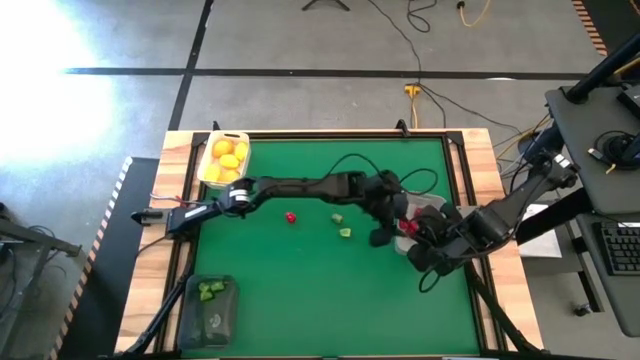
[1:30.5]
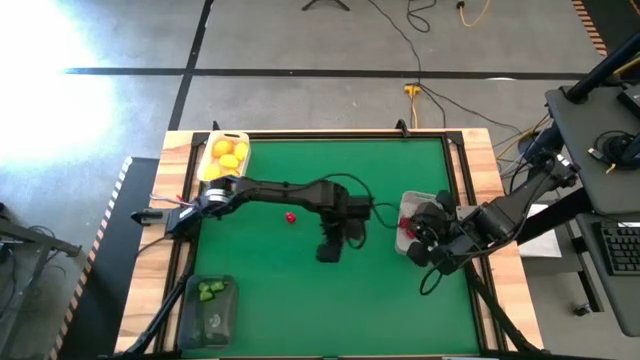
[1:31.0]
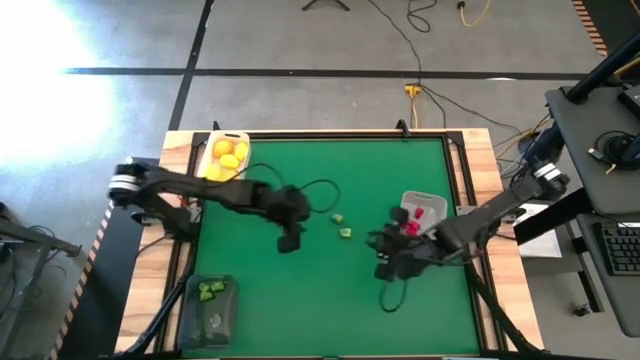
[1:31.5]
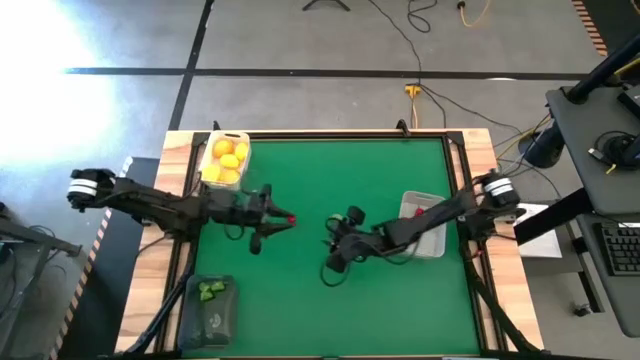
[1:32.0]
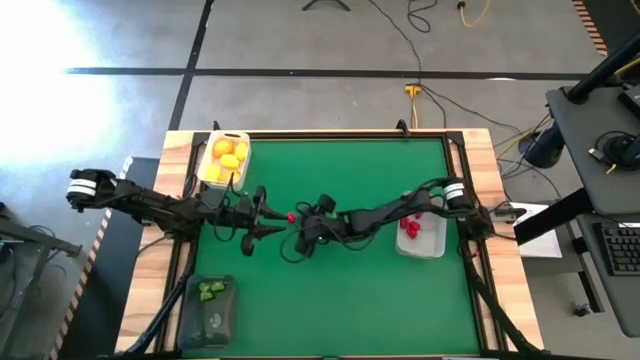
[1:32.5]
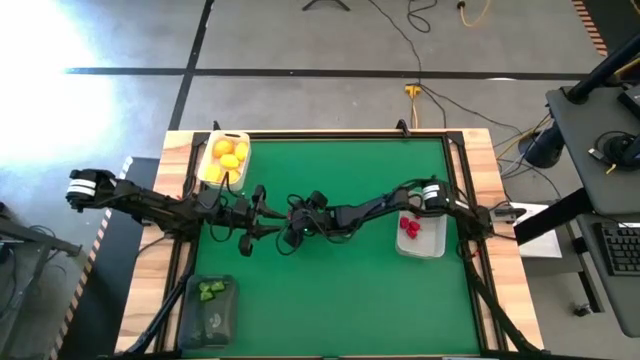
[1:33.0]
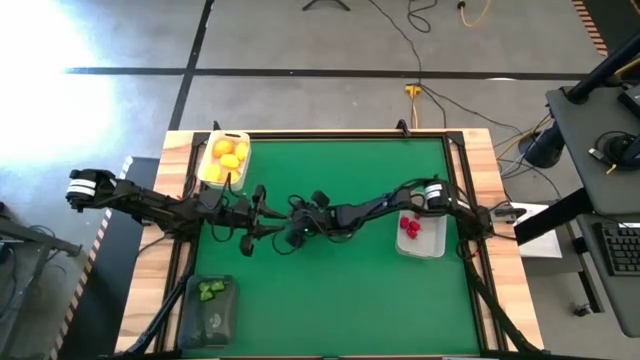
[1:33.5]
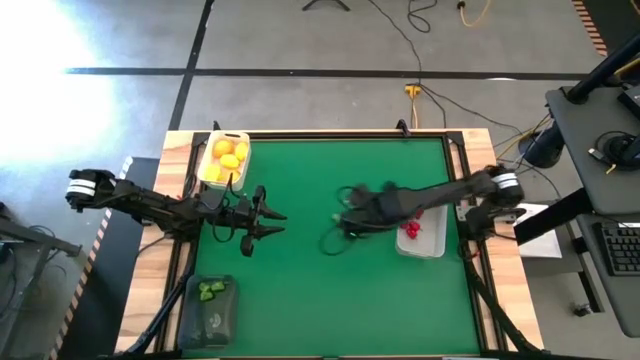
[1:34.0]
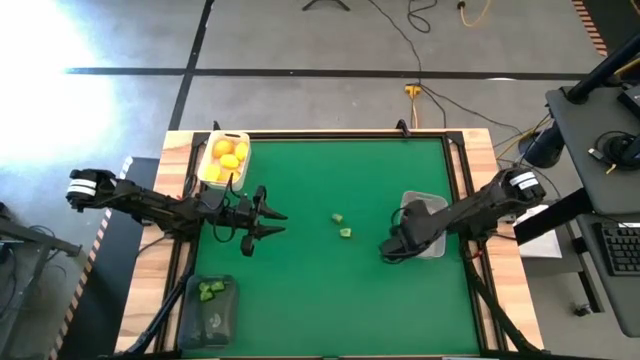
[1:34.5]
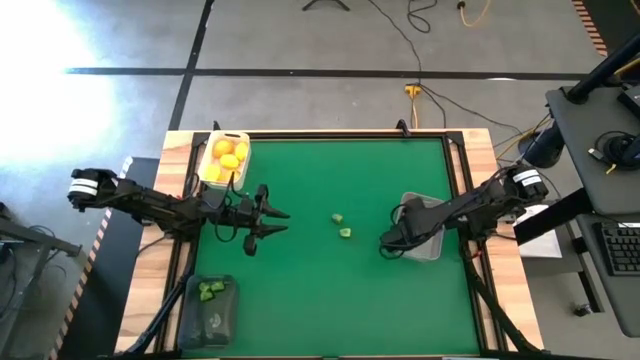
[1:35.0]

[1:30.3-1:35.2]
Task: Sort produce into baskets
Put the red chili pepper into the gray bin

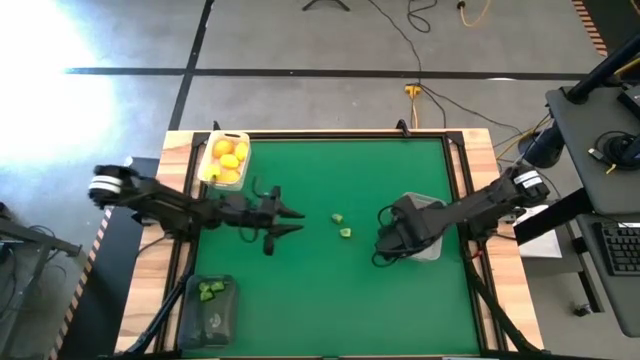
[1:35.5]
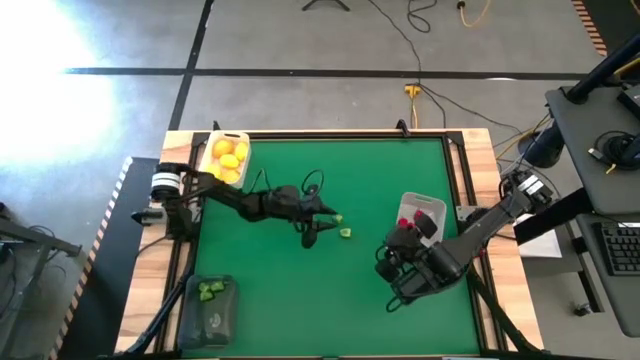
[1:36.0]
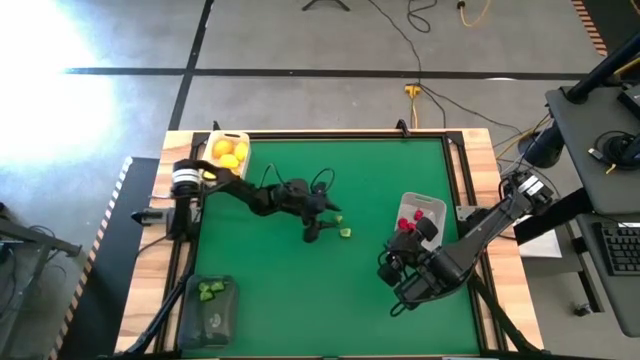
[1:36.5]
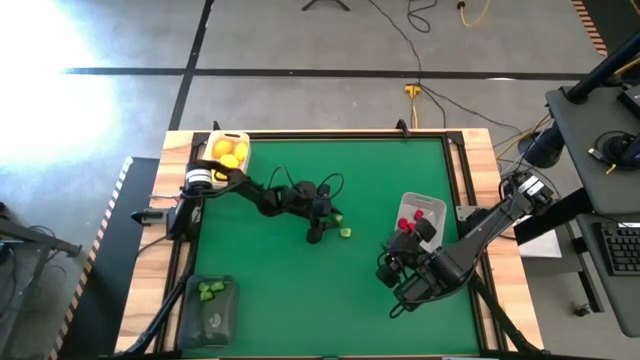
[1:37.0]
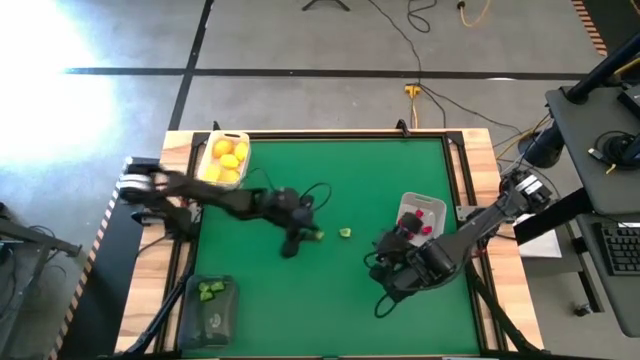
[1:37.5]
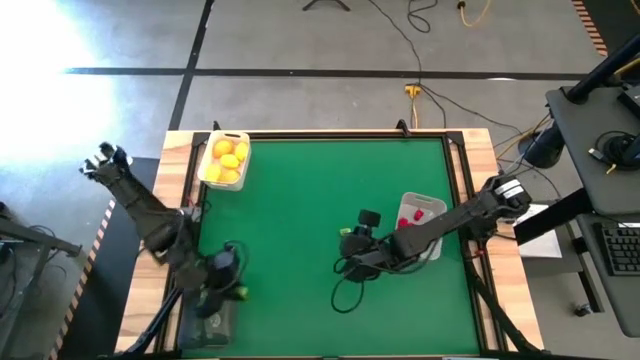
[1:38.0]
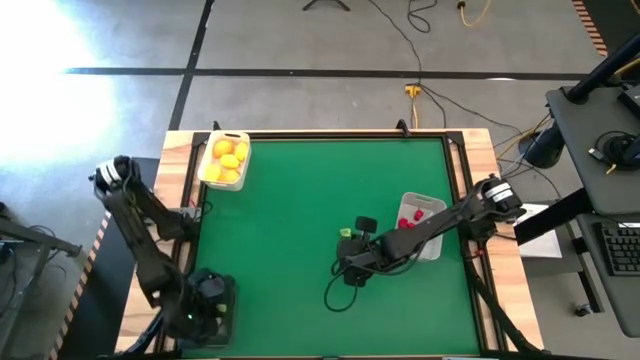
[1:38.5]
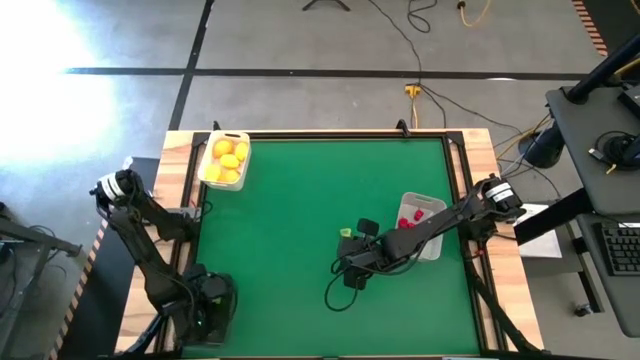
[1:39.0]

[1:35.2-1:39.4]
Put the green chili pepper into the black bin

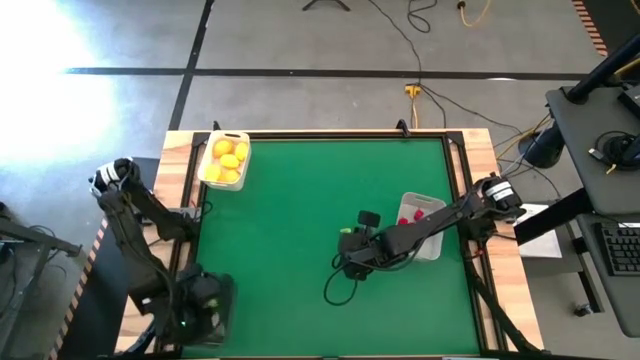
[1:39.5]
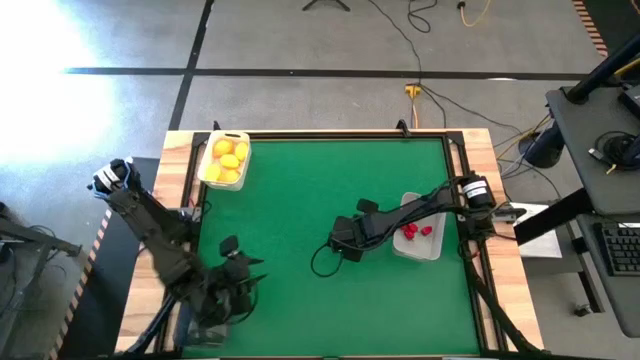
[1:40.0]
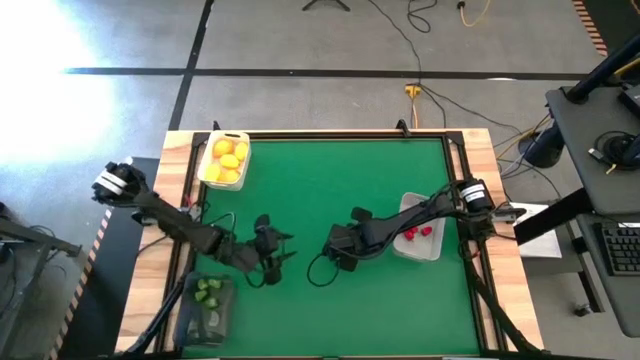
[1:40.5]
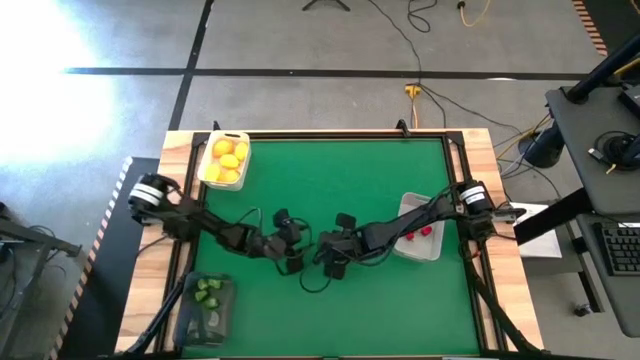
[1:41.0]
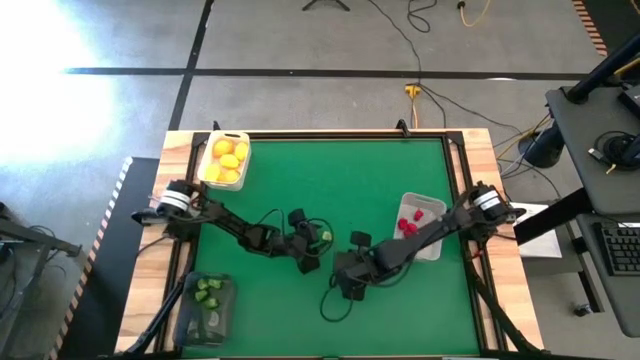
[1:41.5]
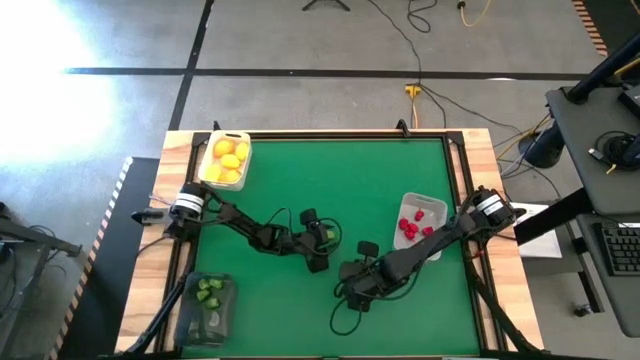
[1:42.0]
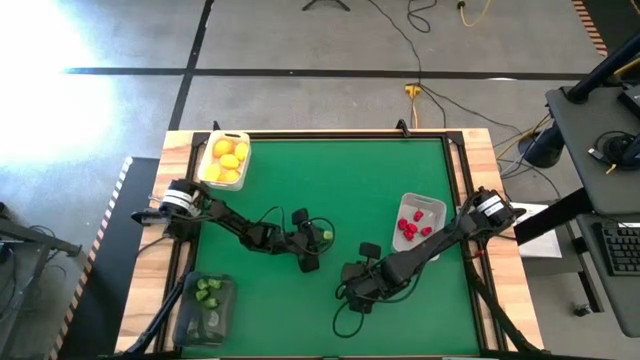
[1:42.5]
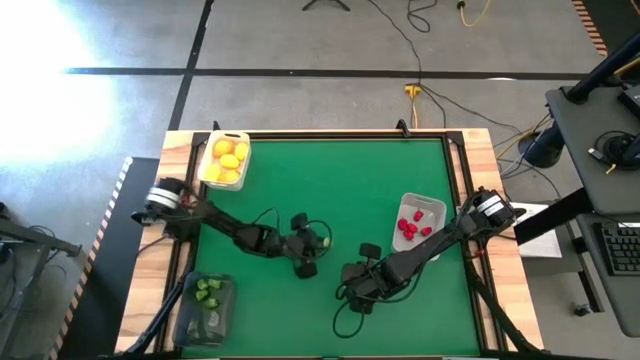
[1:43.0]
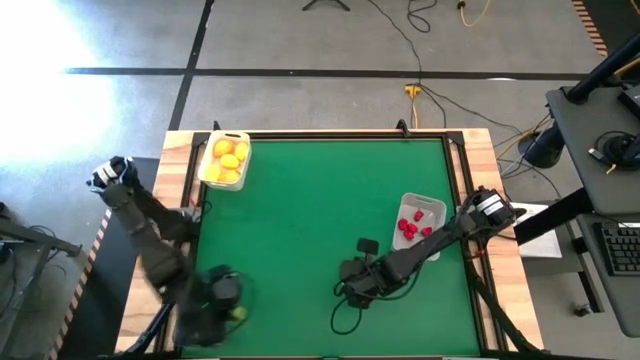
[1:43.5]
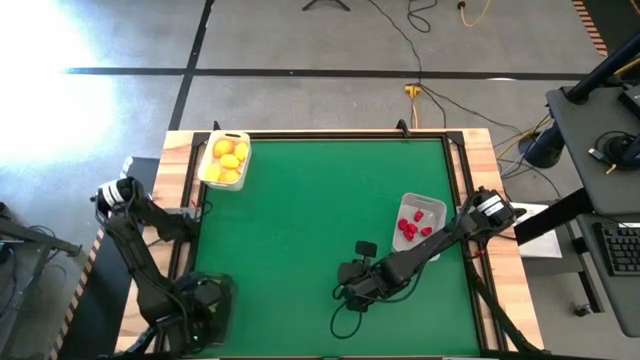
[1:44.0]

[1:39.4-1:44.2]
Put the green chili pepper into the black bin

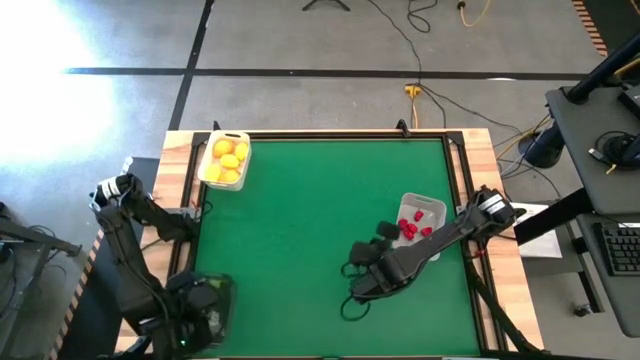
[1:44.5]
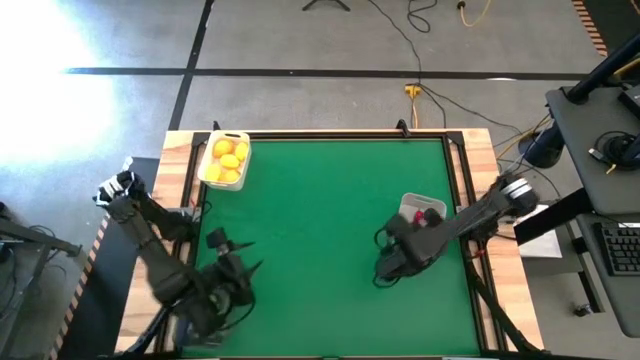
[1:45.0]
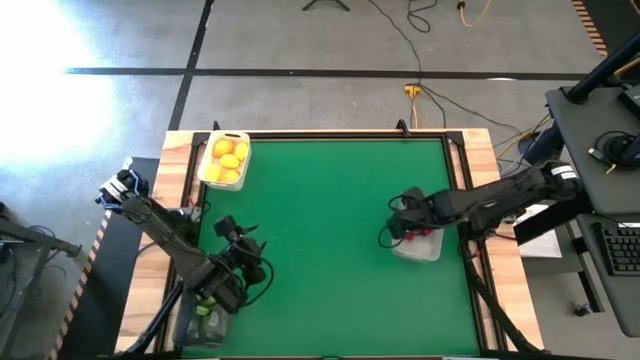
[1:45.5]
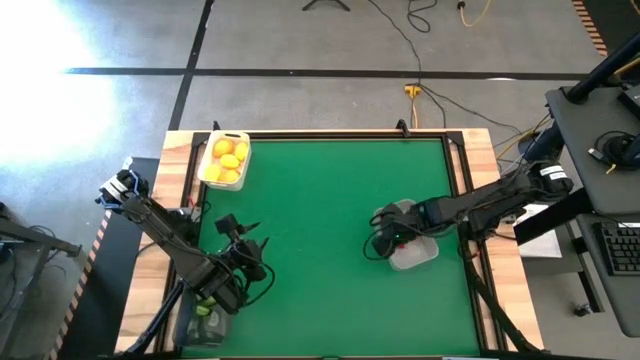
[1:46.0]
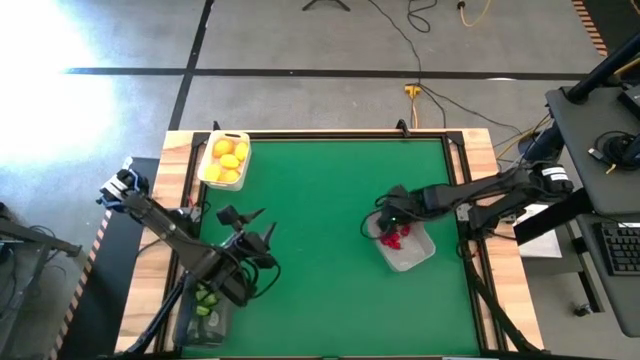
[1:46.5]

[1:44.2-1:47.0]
Adjust the gray bin on the table

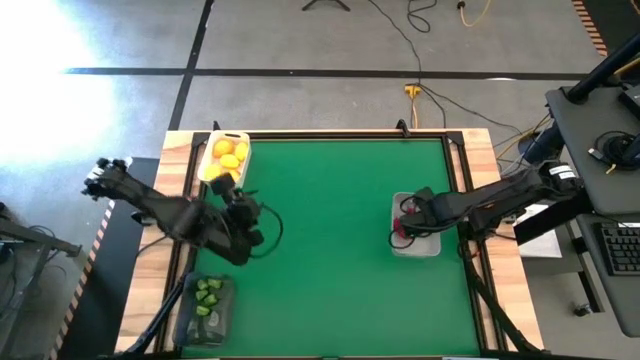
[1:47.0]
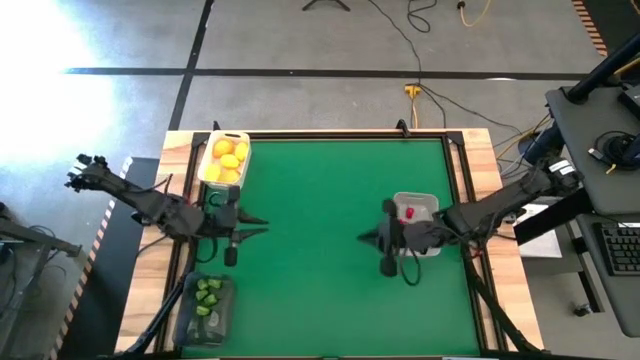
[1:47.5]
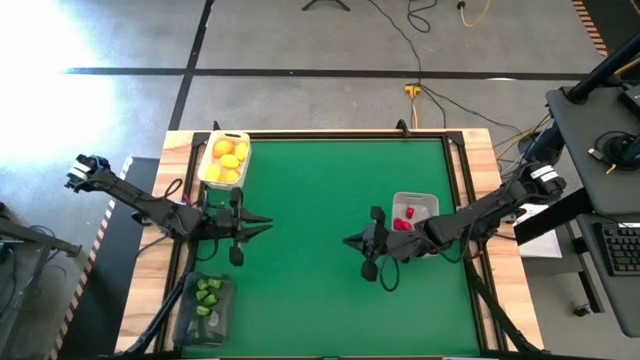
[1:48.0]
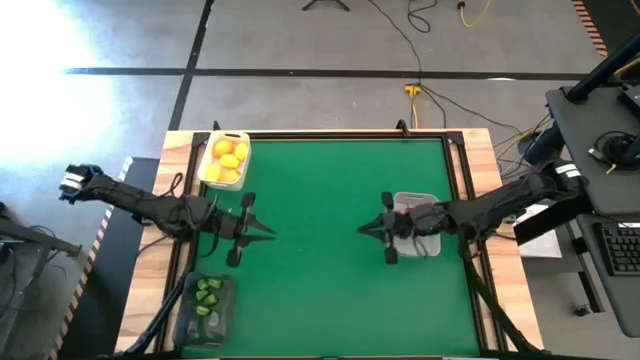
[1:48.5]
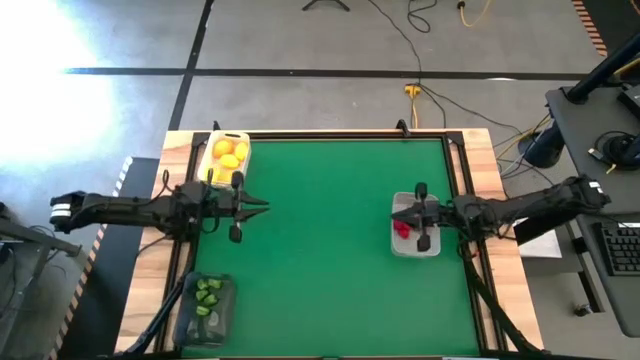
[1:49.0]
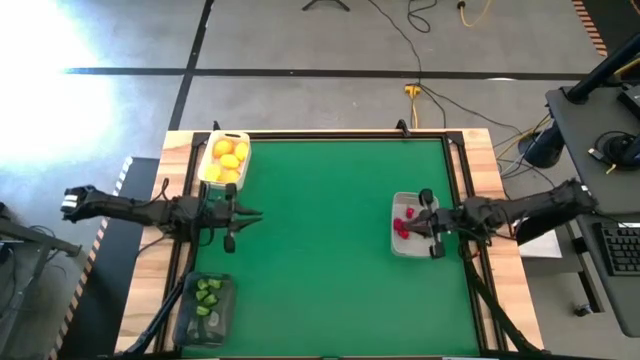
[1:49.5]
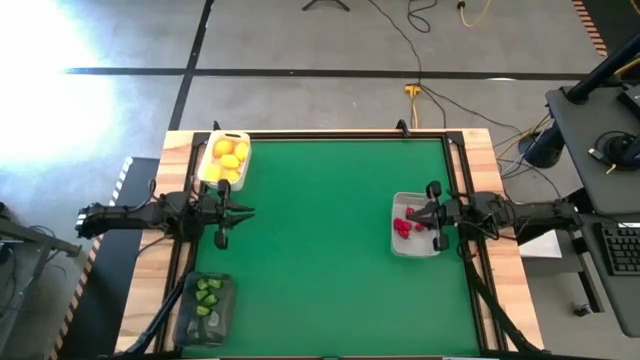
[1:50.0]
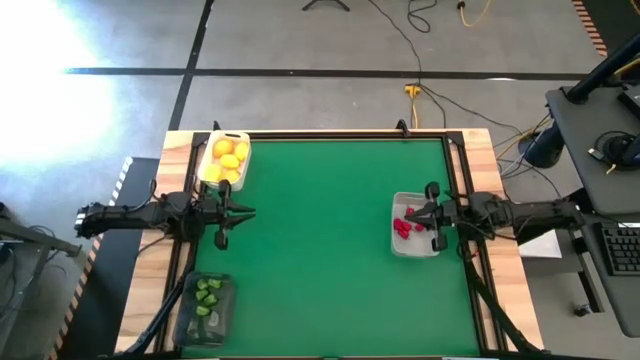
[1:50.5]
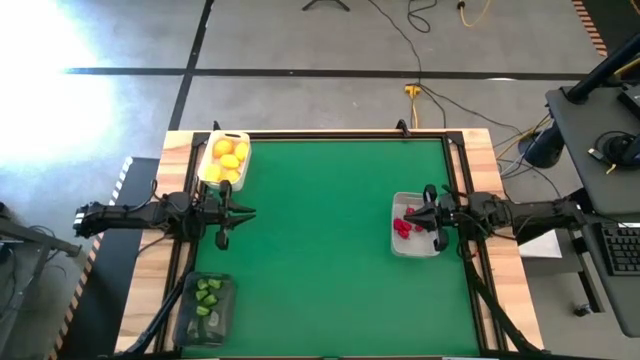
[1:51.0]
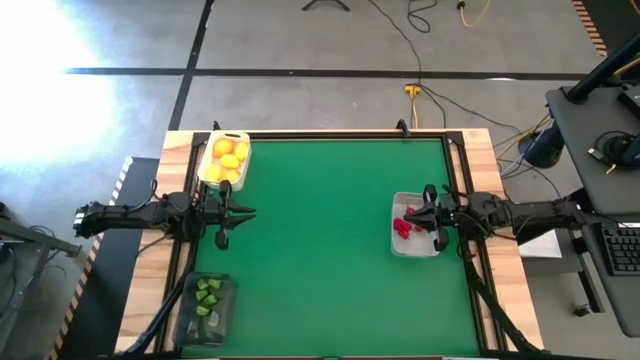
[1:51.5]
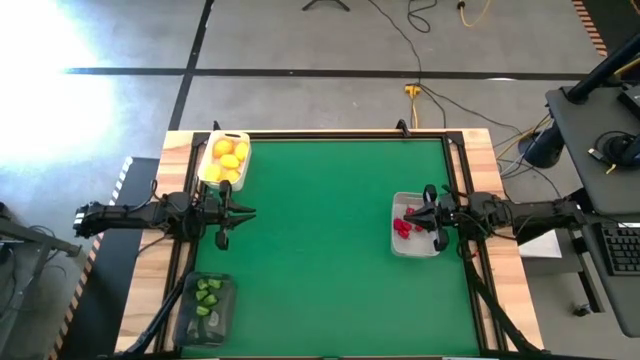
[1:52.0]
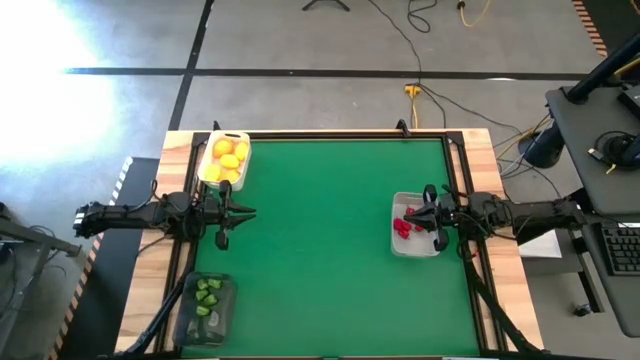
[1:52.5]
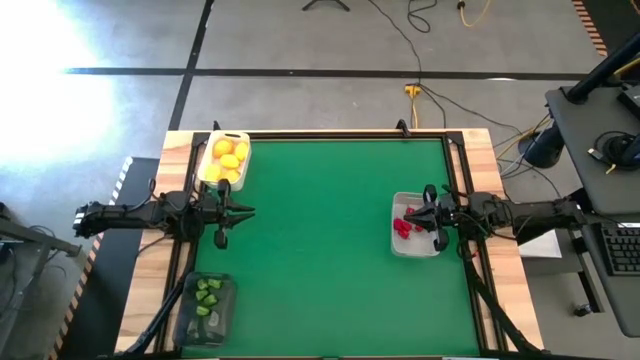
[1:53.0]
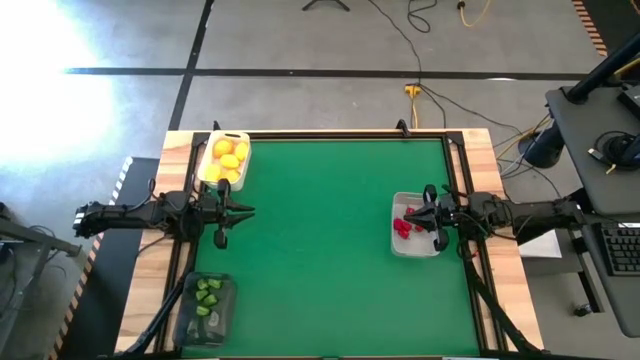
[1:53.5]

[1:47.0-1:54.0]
Return to Home Position
